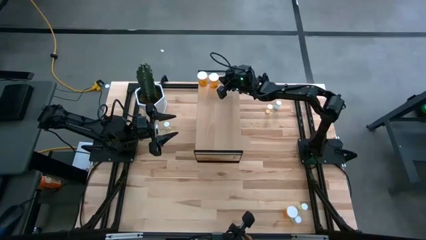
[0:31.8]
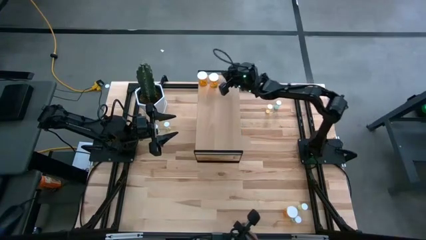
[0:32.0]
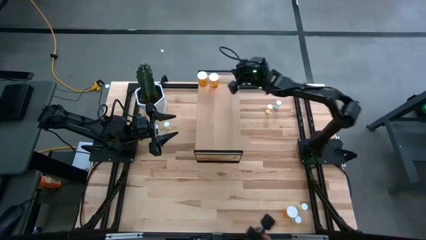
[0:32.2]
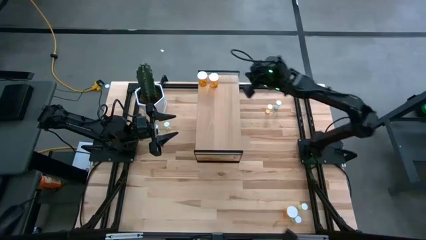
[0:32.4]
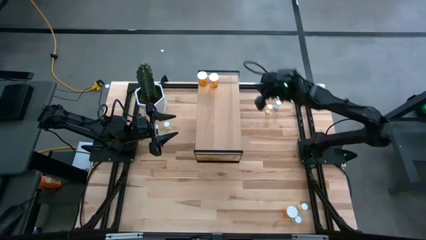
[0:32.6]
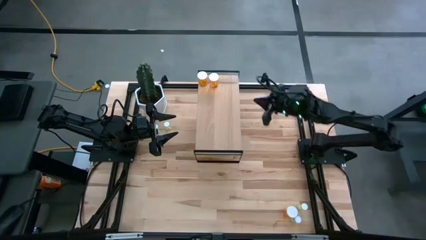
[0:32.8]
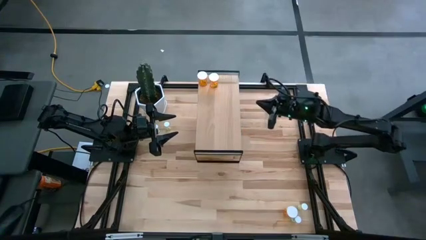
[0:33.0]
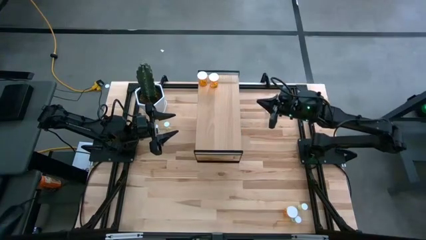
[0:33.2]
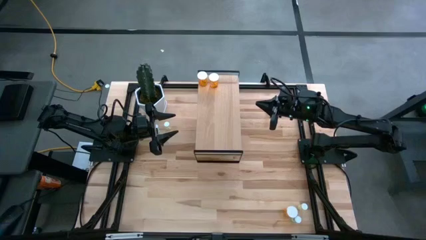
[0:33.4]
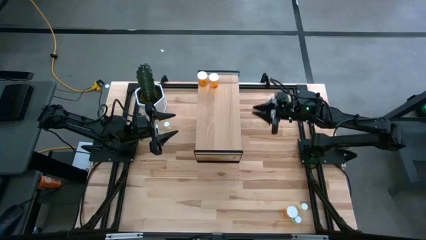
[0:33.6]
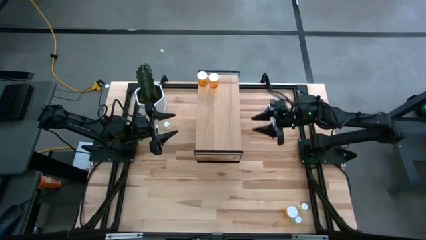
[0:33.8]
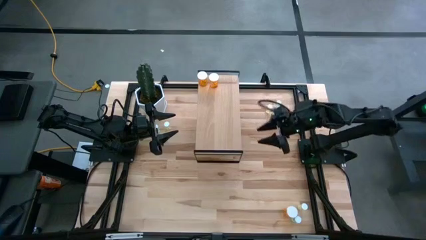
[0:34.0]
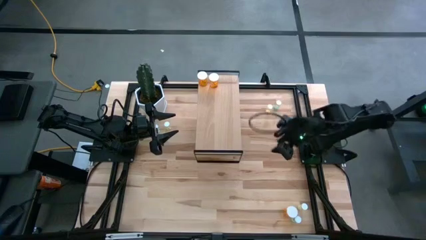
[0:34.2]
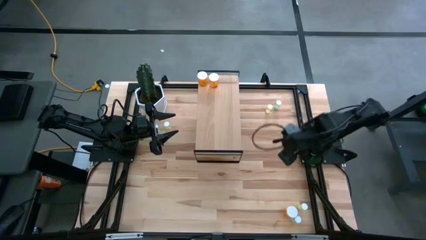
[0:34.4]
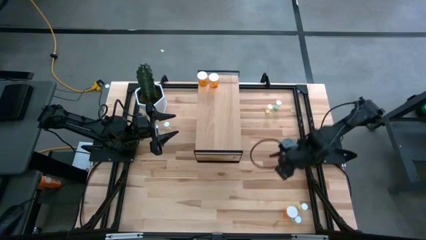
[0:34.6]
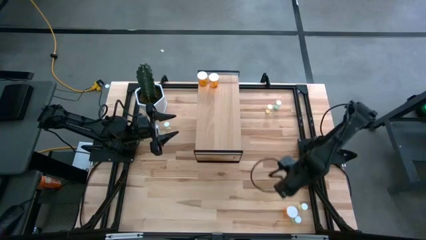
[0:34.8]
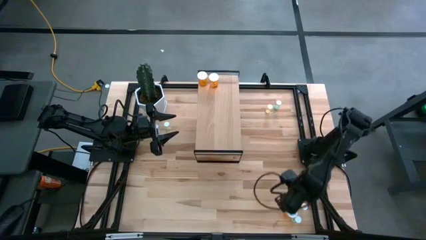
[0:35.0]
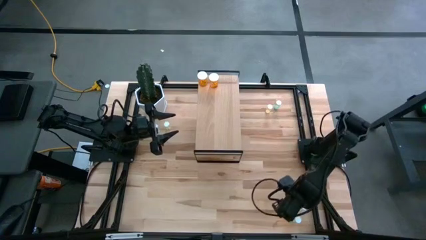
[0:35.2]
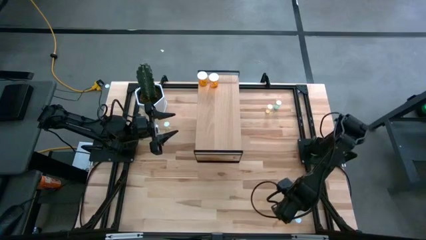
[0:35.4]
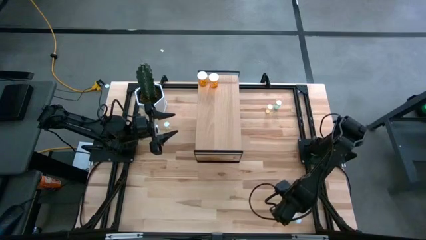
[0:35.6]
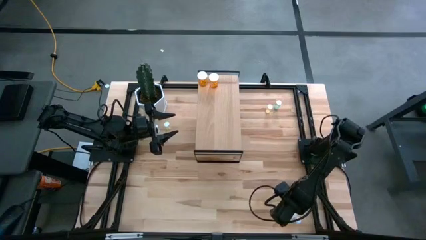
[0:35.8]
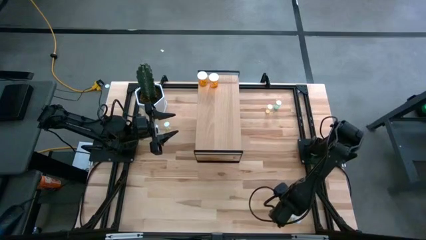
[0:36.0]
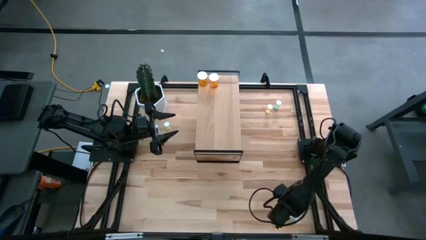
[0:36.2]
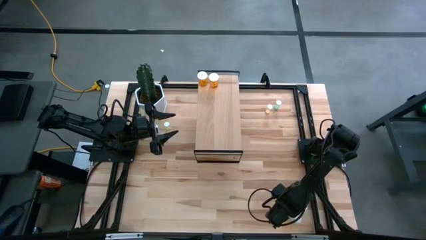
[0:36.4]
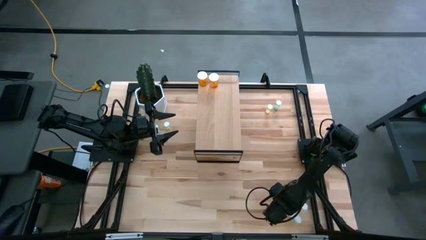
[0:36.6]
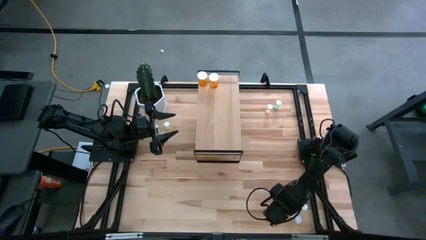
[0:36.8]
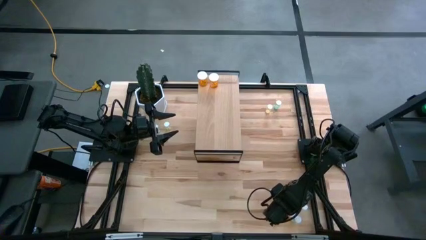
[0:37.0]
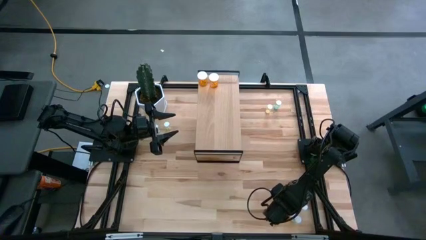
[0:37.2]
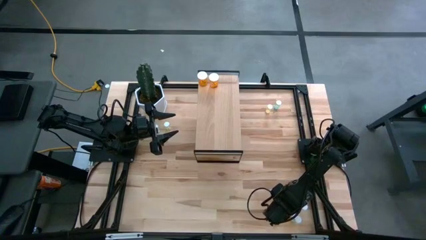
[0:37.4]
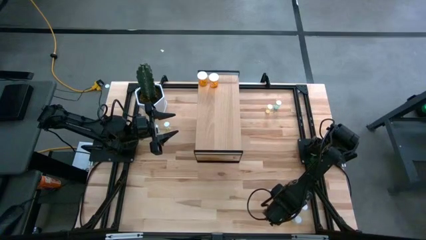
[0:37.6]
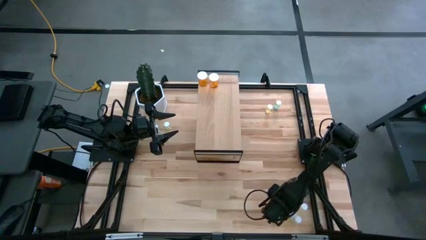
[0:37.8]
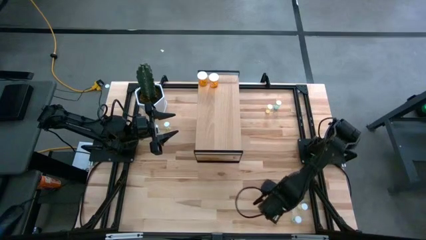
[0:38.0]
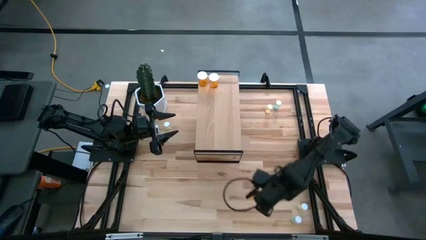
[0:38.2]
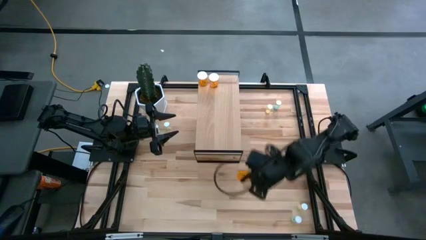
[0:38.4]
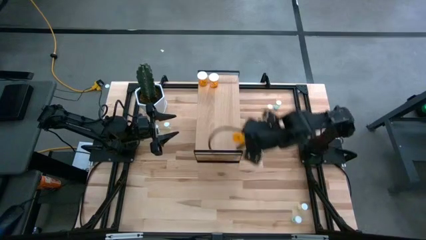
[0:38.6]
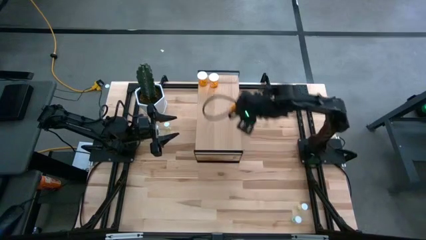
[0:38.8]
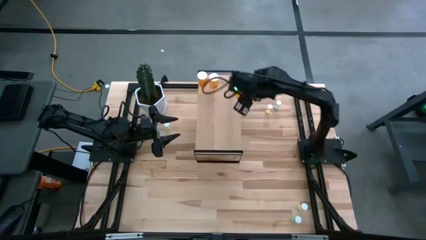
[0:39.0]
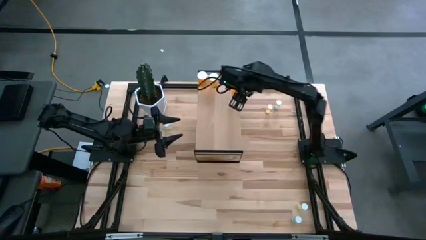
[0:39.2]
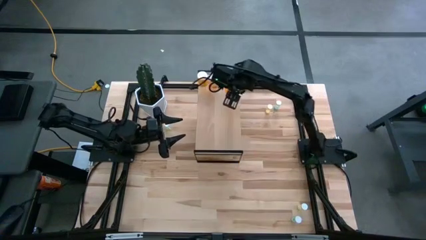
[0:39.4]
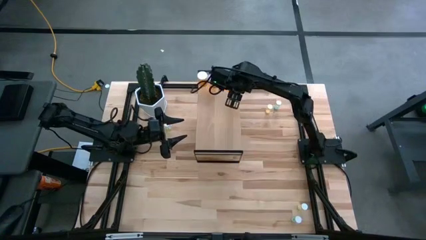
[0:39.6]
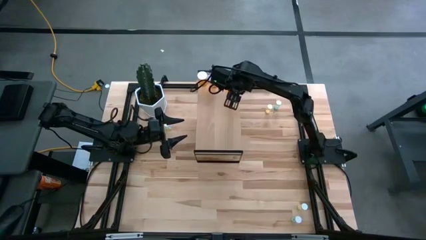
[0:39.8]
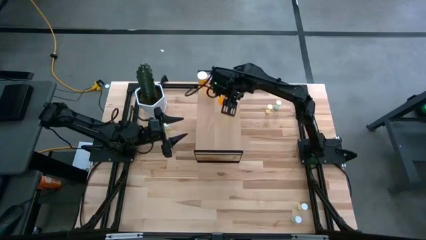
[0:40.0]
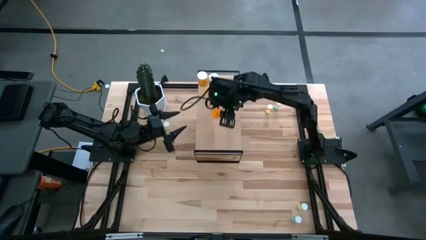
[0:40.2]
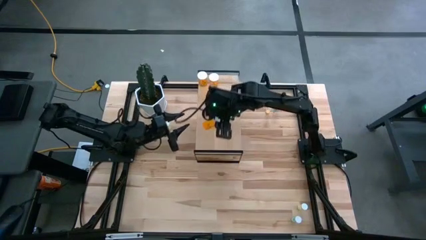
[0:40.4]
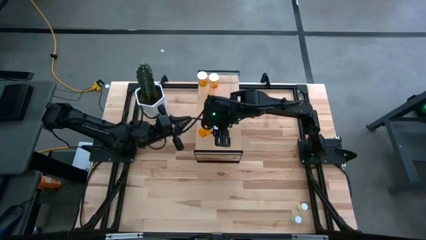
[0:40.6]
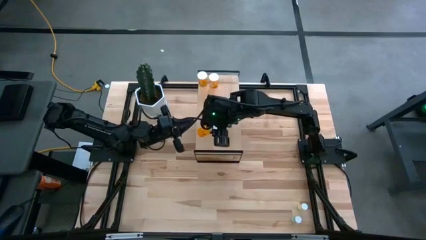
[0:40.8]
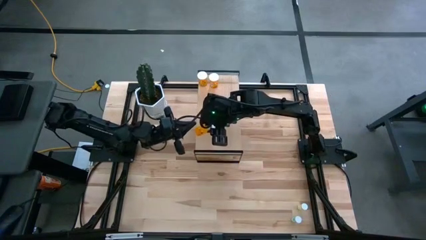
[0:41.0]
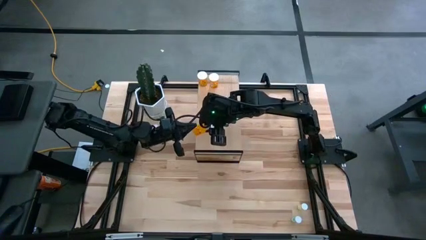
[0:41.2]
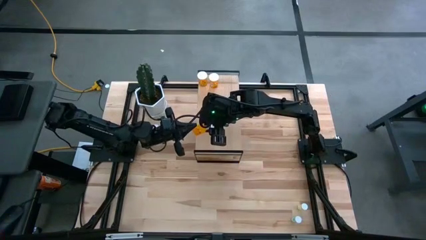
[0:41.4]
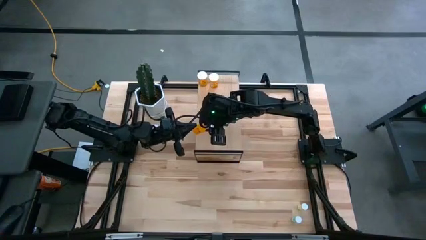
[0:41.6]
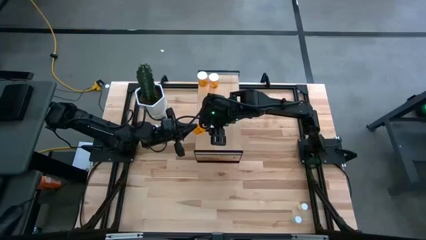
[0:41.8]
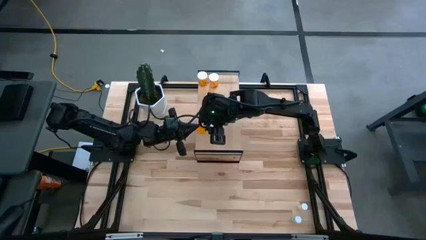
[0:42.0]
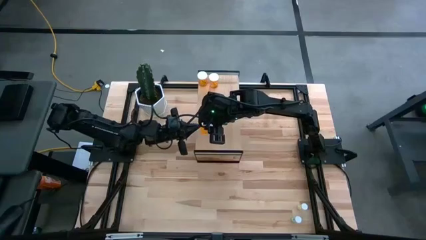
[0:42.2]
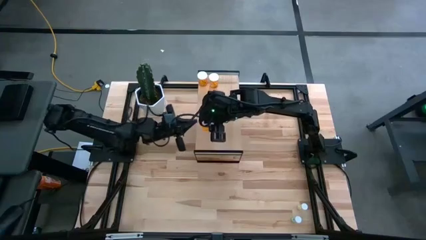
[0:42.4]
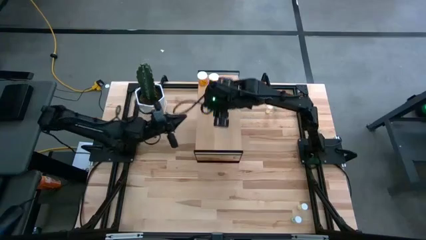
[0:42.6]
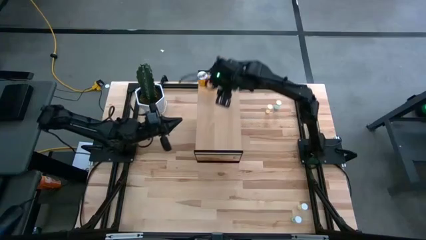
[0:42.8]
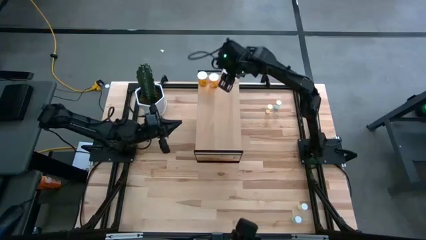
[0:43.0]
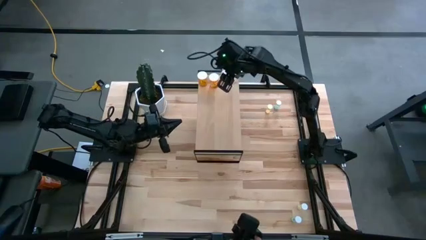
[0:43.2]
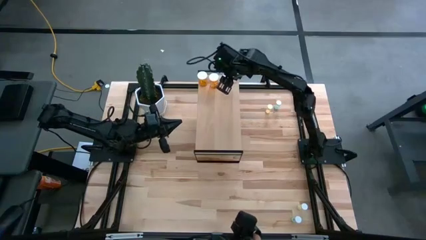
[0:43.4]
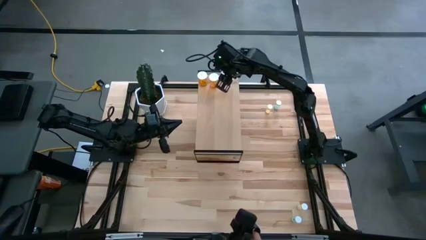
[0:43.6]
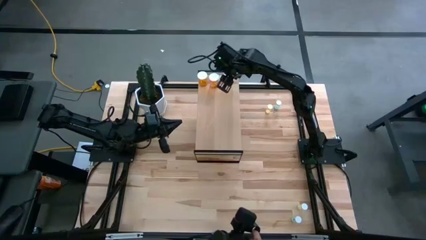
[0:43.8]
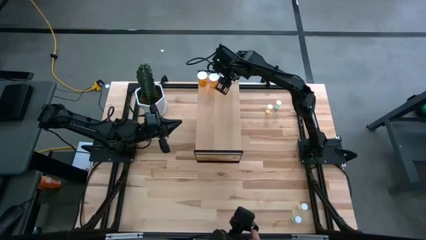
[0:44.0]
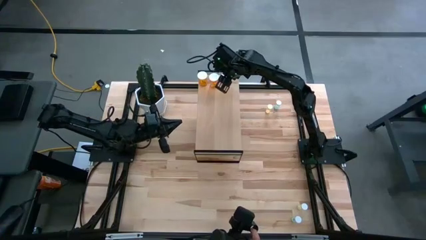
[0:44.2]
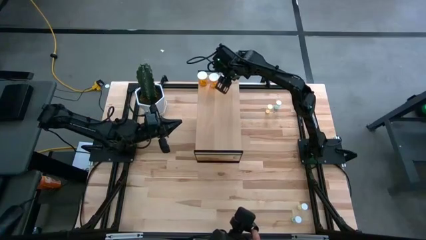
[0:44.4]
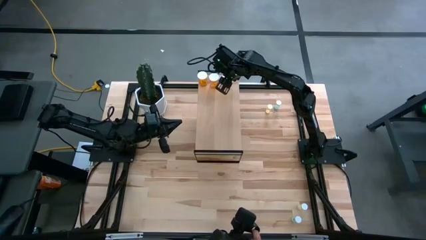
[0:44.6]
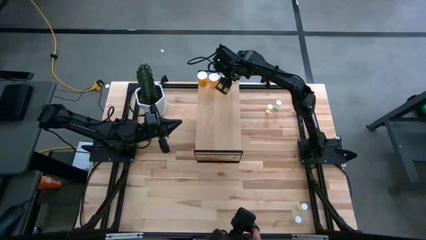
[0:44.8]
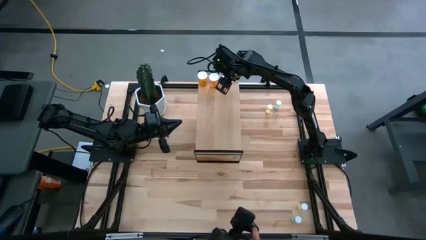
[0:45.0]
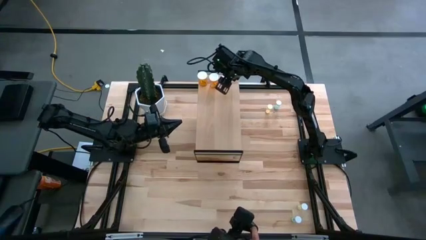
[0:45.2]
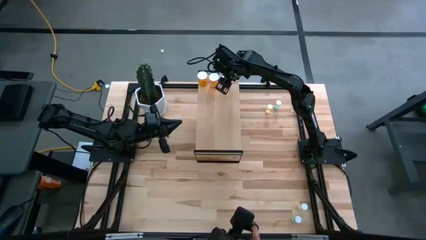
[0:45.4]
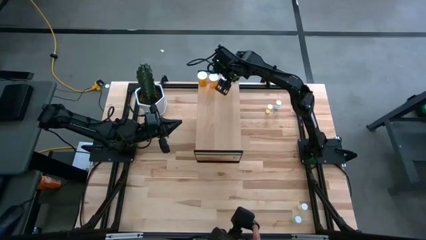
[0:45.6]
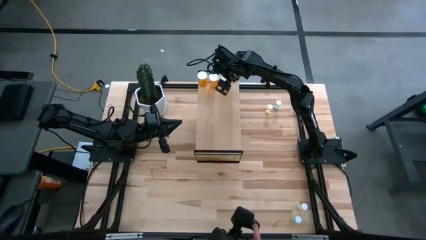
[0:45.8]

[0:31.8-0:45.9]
Task: Pick and place medicine bottles onto shelf by color
Put the orange pill bottle on the shelf aligned with the other orange pill bottles

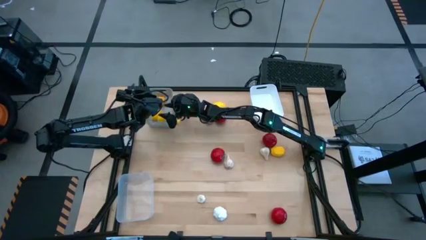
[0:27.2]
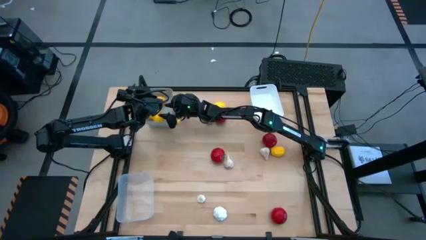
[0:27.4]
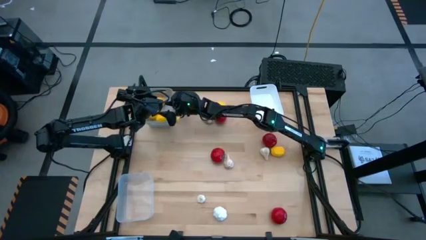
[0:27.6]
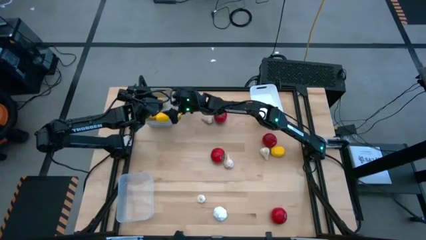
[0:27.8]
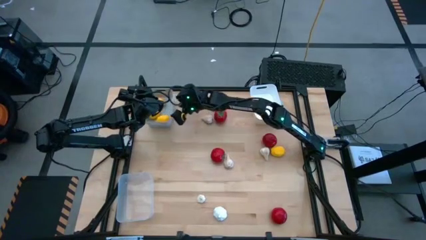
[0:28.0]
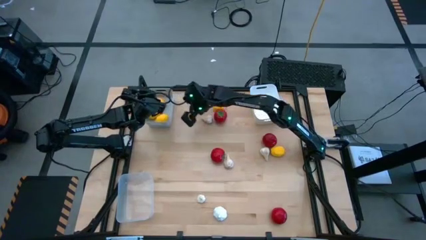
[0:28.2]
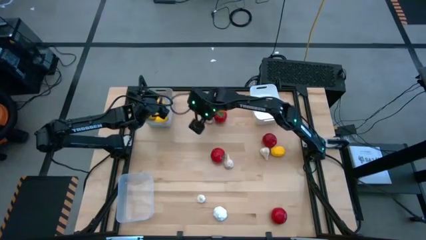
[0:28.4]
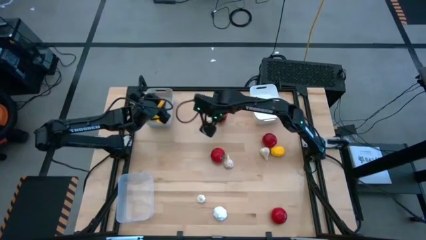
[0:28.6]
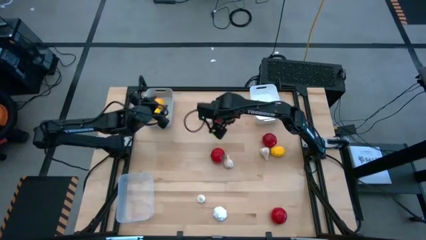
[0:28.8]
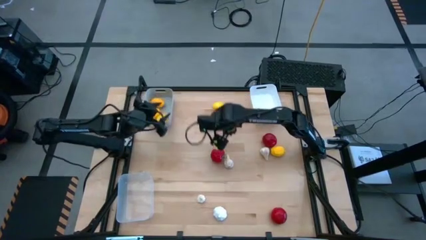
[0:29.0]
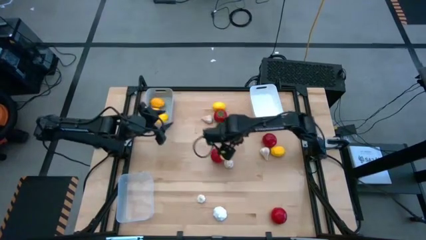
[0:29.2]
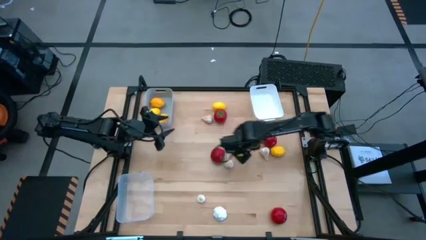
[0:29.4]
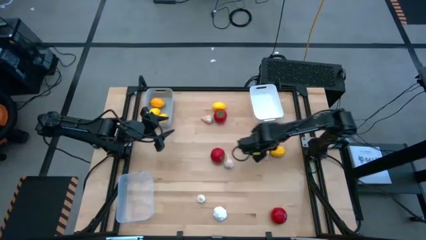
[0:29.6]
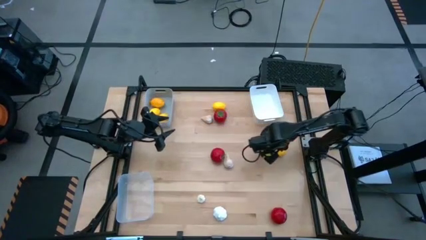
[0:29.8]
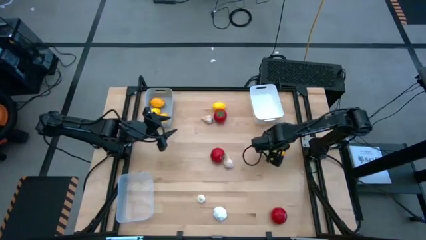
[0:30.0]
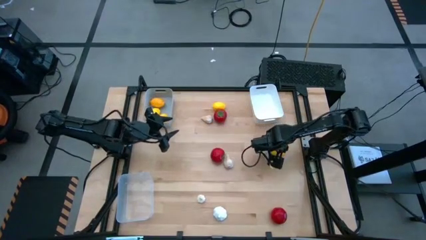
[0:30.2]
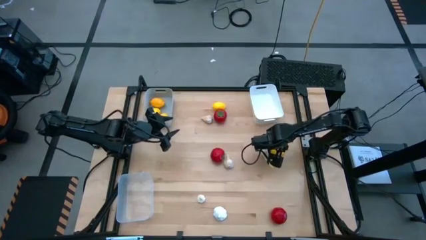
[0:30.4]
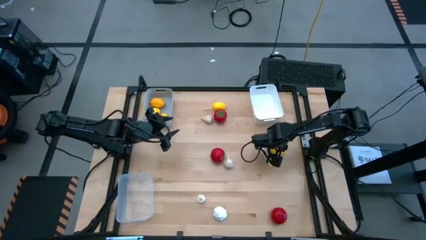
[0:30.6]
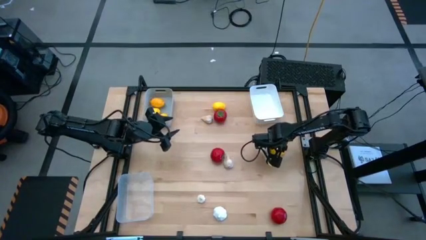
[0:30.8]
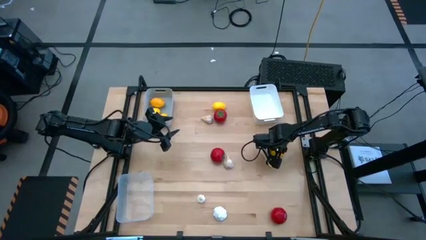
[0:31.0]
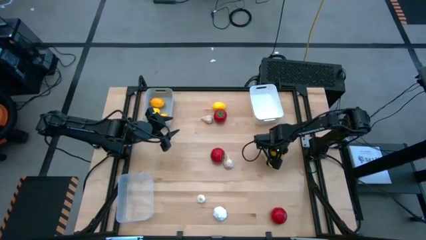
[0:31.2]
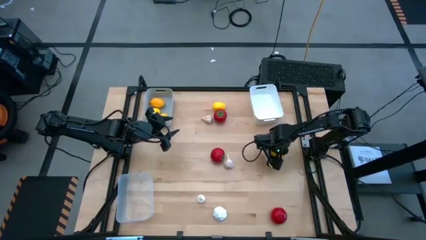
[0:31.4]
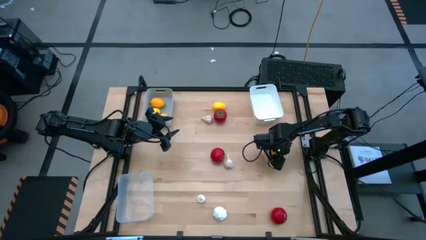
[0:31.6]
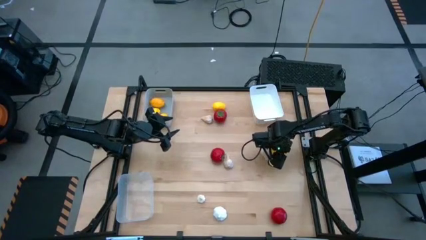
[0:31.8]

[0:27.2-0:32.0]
Task: Sort produce into baskets
Put the yellow lemon into the gray bin
